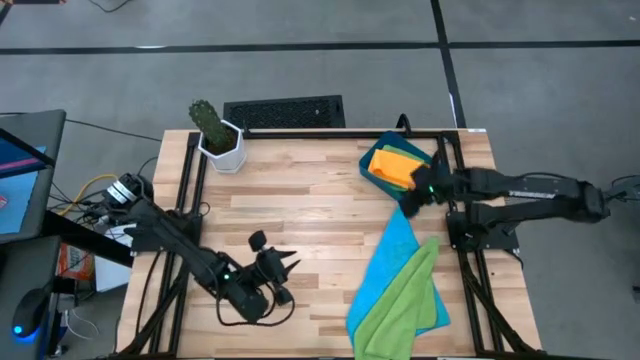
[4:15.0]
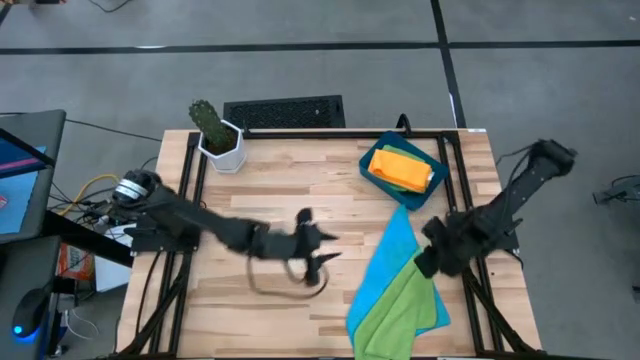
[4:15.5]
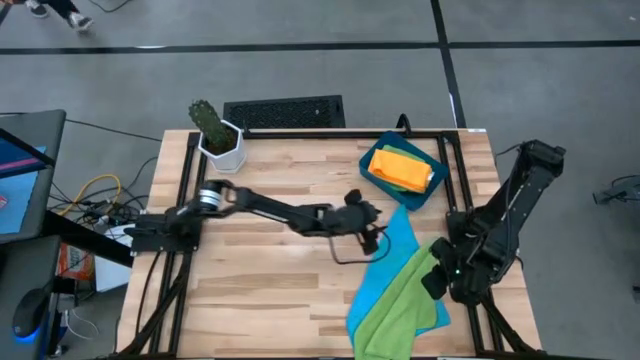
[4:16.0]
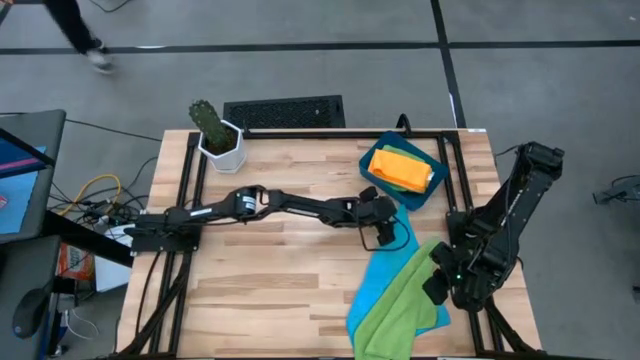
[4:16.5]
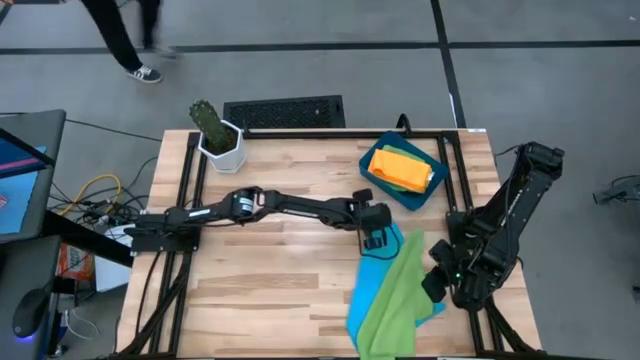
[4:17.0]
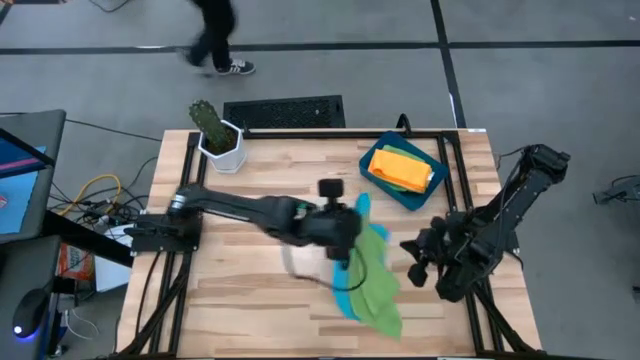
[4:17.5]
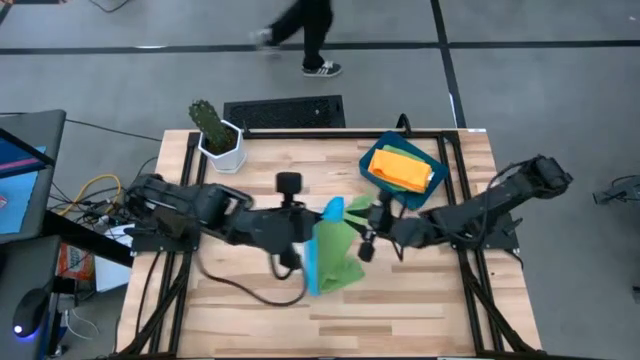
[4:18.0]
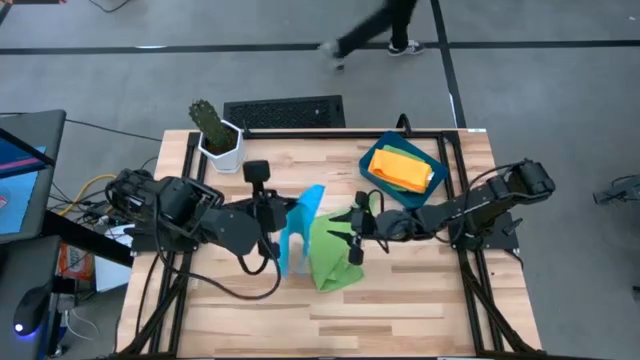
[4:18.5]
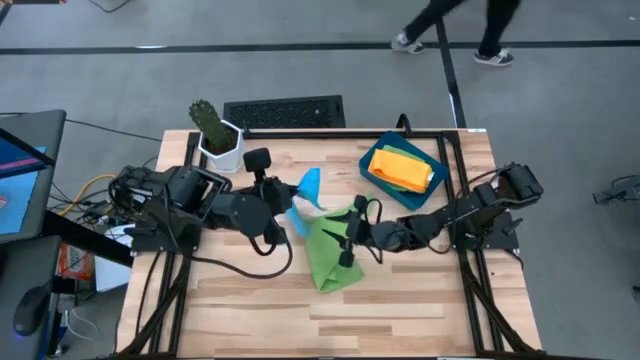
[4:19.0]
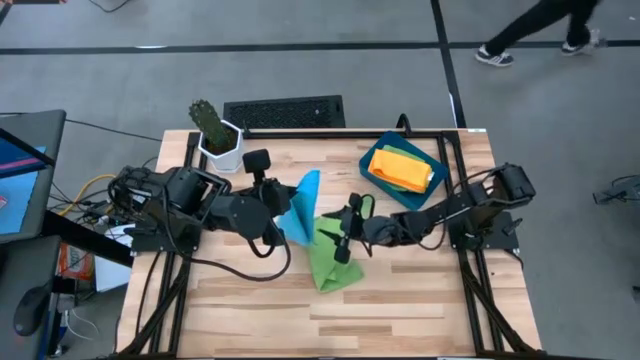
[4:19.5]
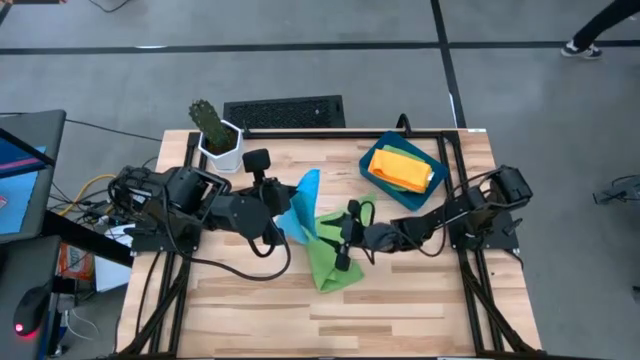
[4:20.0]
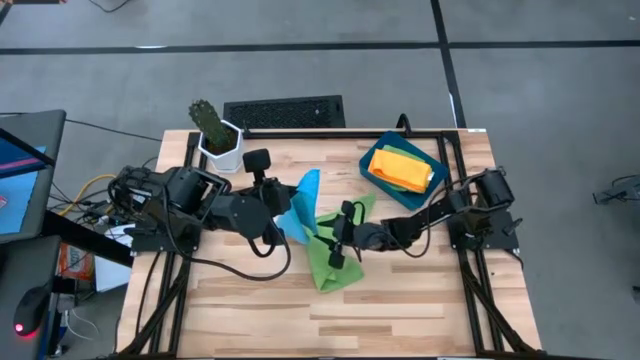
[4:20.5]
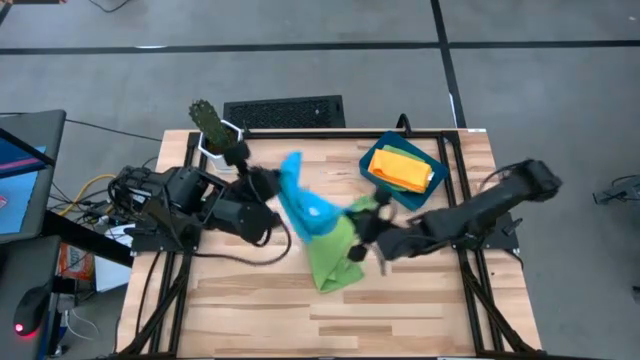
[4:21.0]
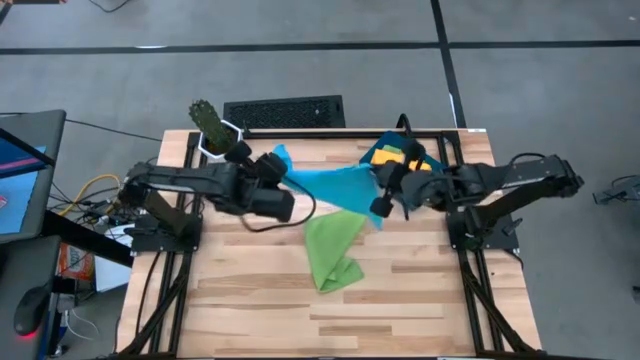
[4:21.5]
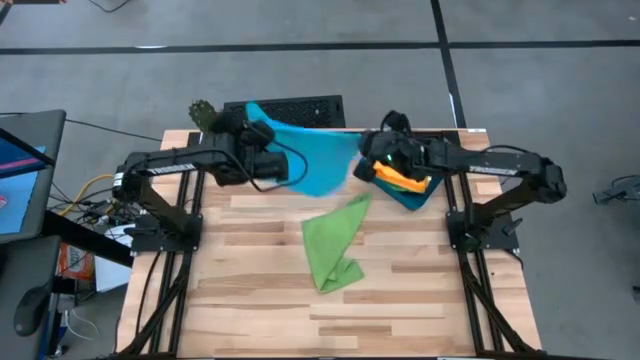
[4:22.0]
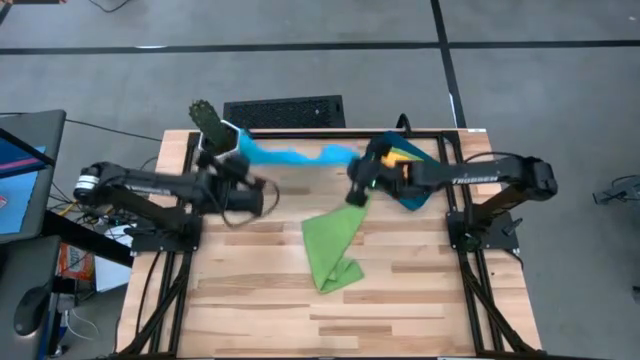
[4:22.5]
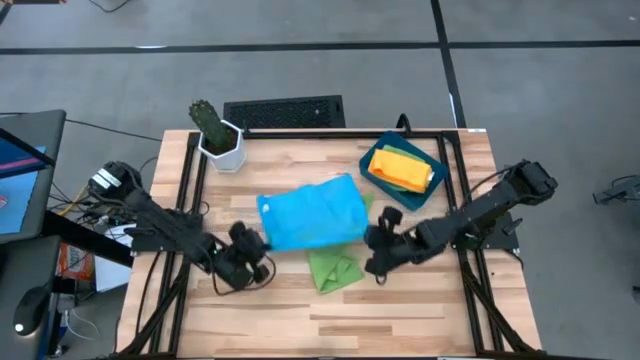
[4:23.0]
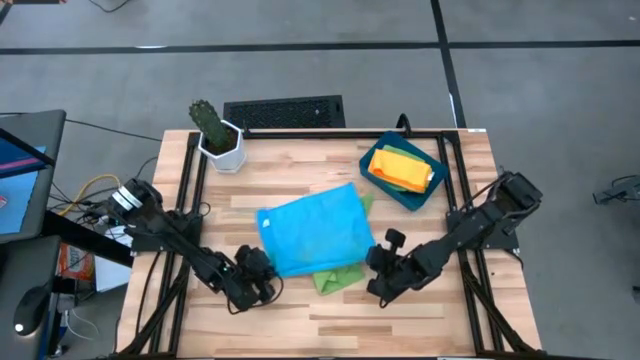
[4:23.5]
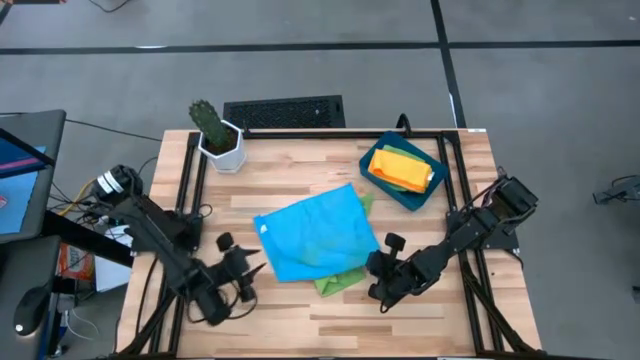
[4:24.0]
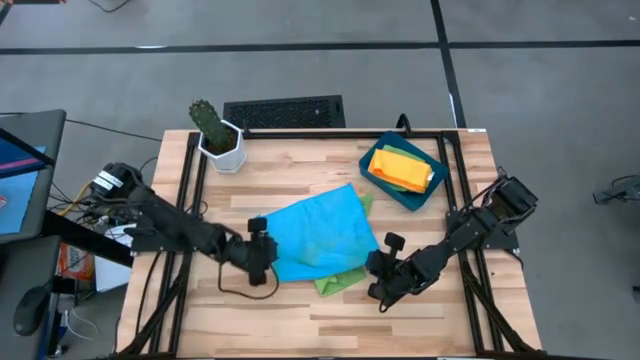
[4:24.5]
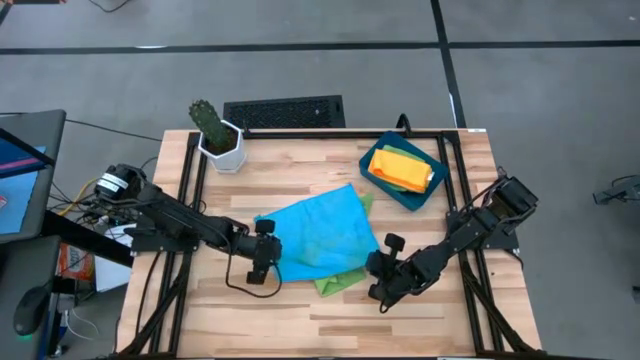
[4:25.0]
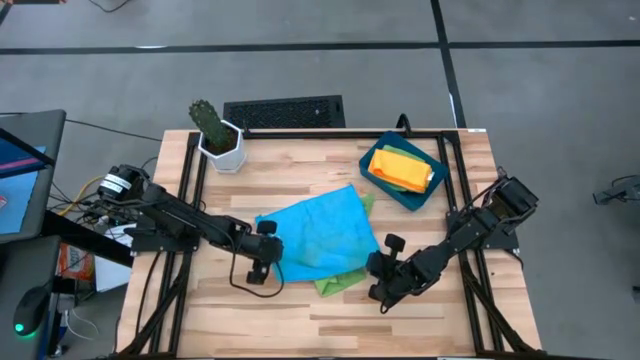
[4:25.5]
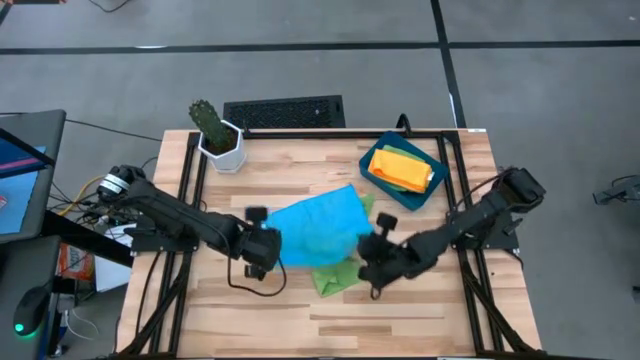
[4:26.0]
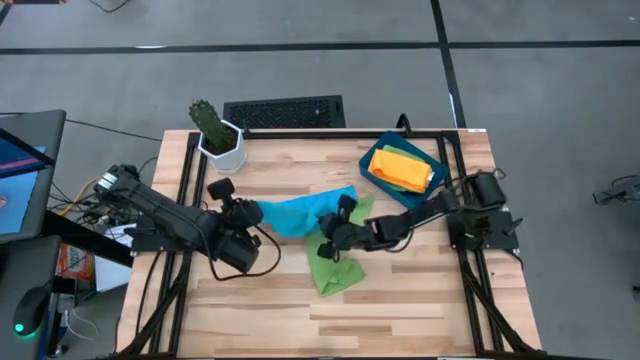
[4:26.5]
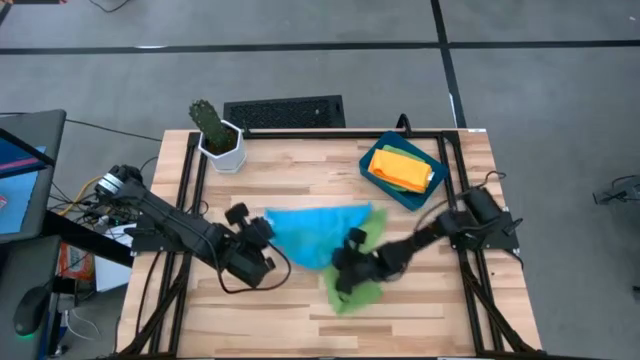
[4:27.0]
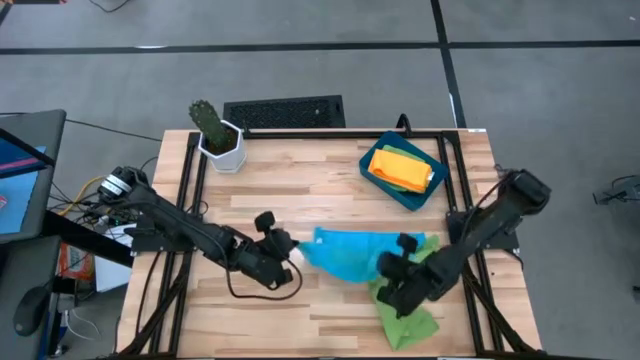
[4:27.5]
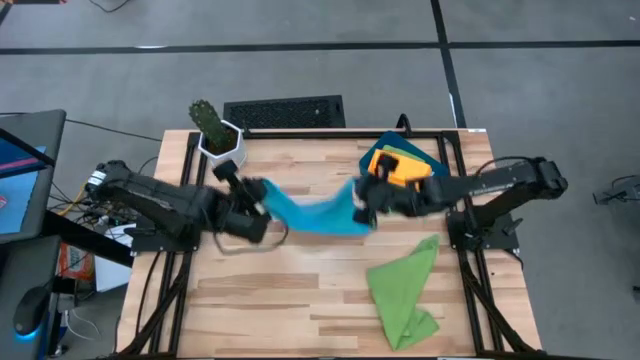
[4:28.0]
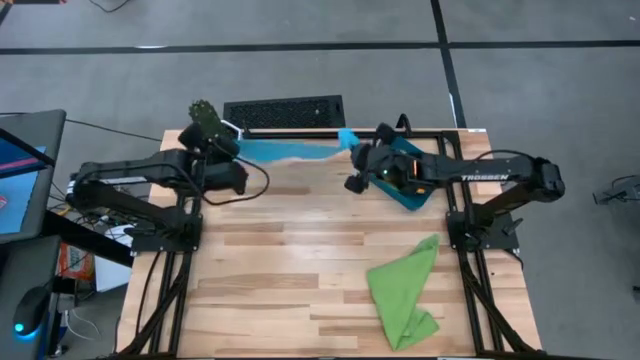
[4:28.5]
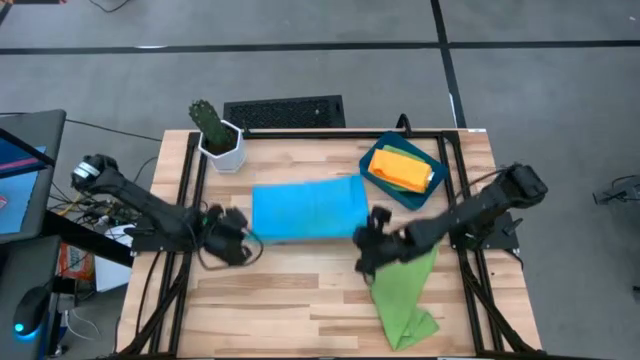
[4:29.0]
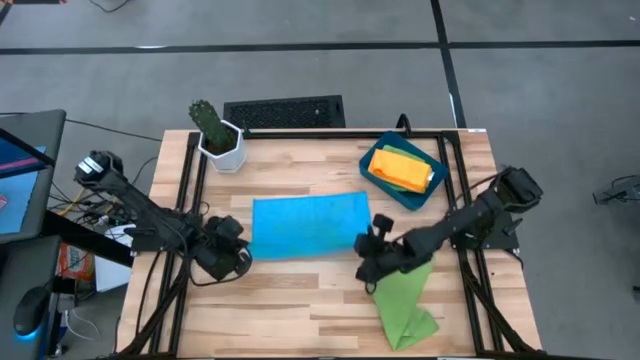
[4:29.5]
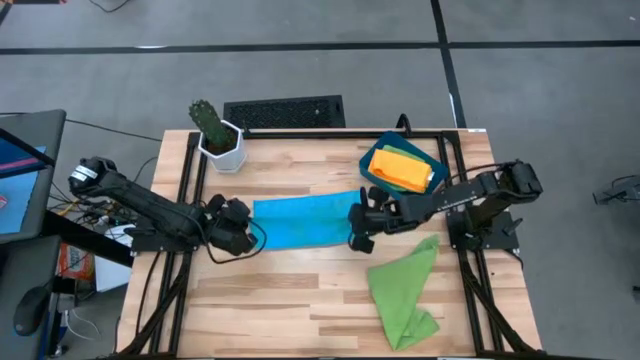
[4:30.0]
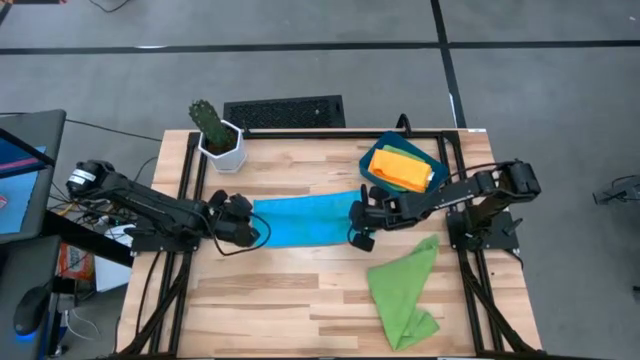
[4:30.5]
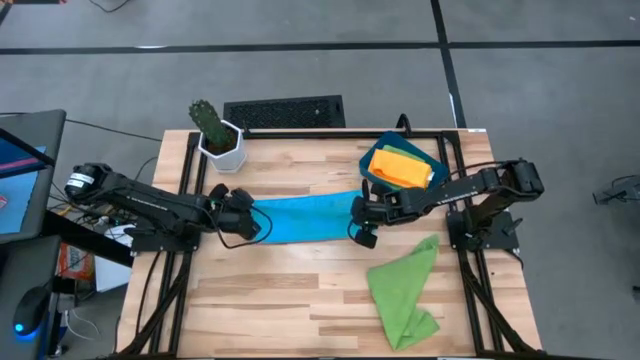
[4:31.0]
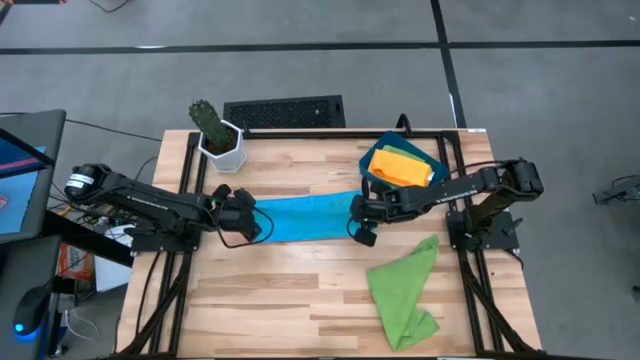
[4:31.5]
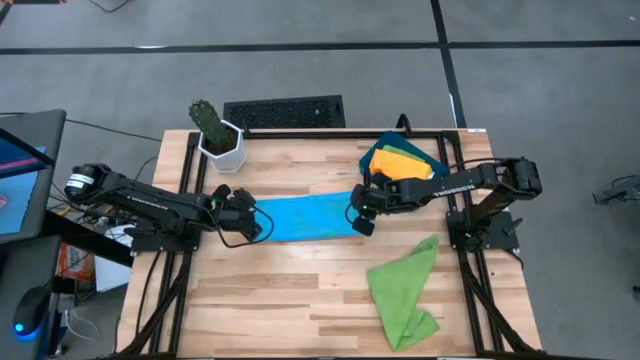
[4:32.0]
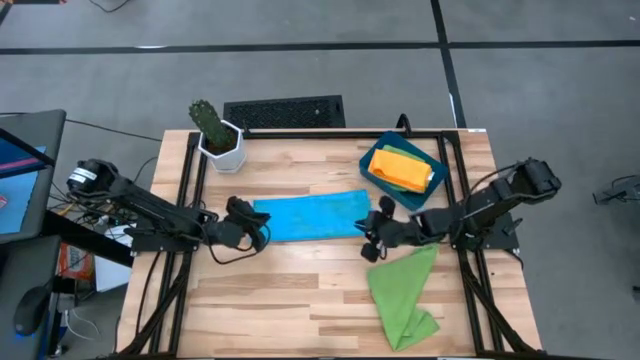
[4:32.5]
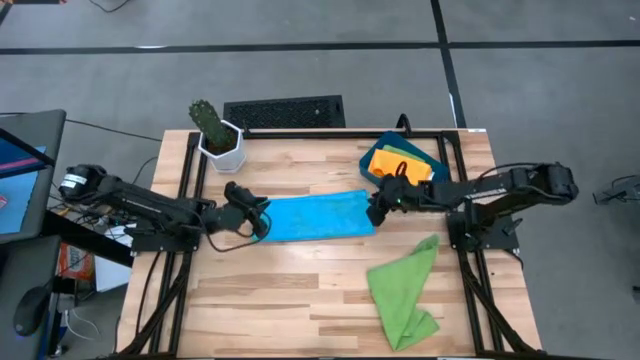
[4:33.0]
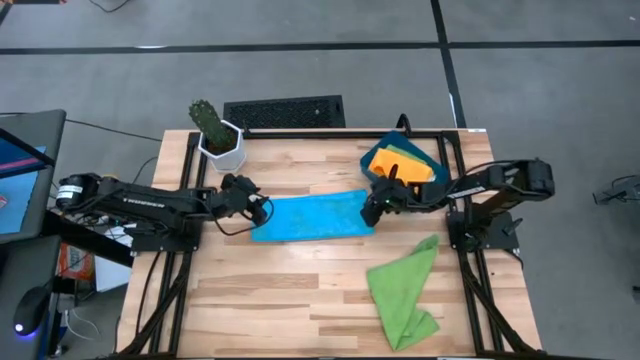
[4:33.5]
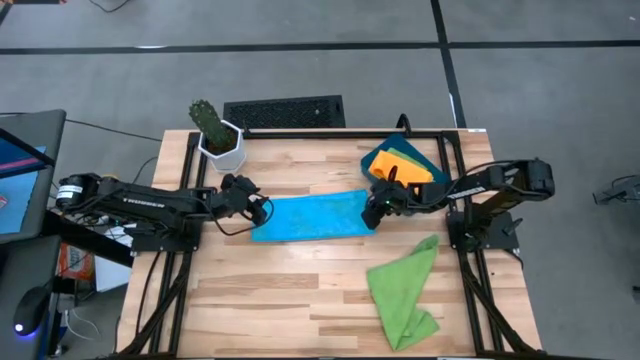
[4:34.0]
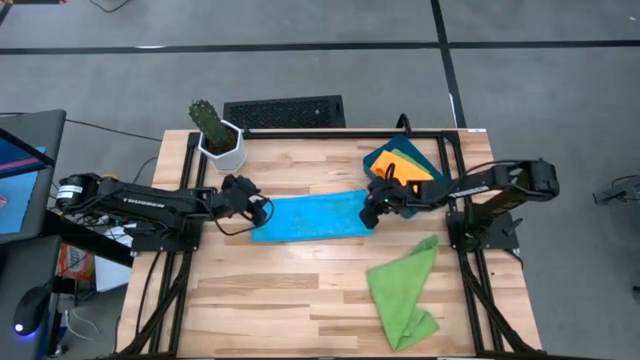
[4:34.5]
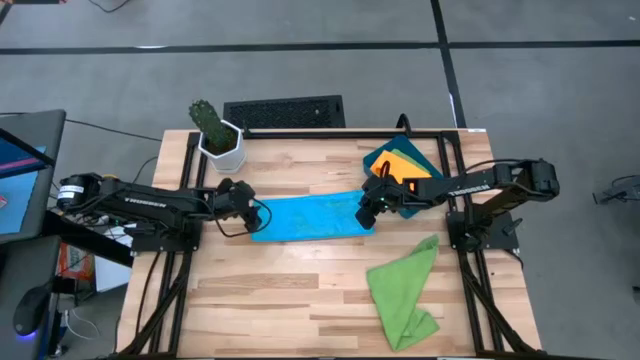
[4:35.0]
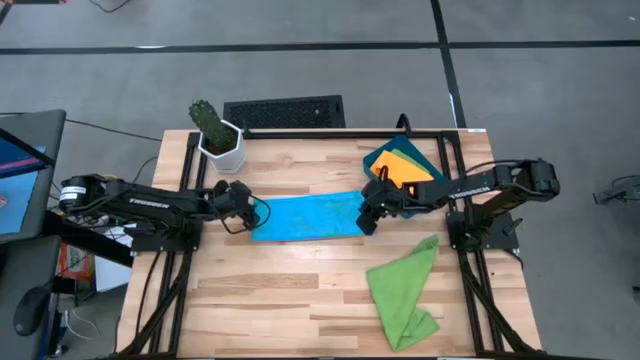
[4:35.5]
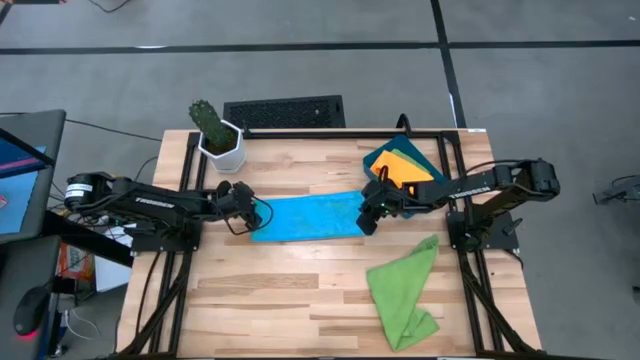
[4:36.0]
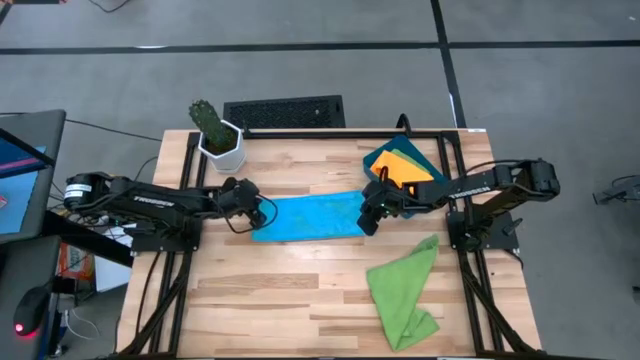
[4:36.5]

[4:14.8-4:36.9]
Task: Fold microfiber towels
Fold the blue microfiber cloth
